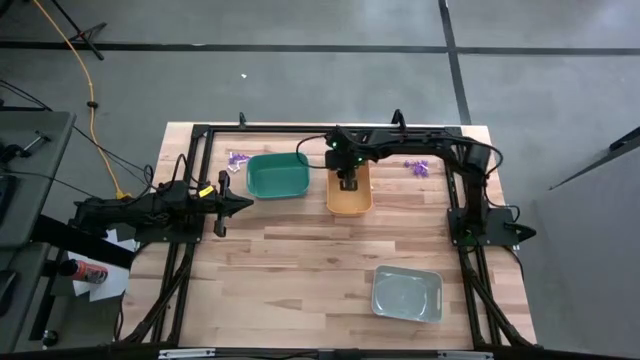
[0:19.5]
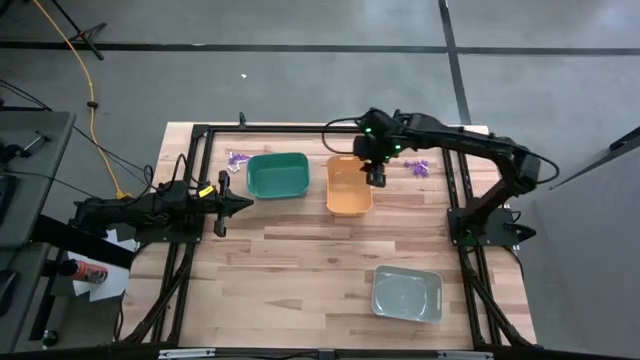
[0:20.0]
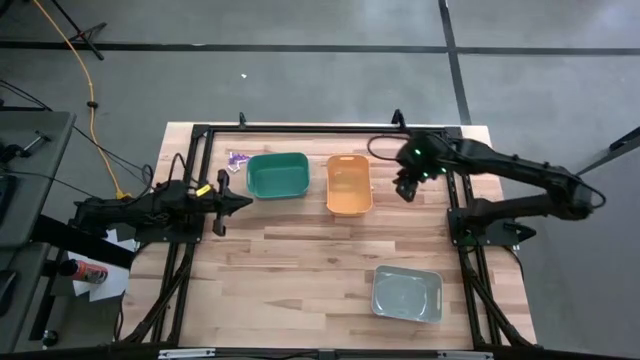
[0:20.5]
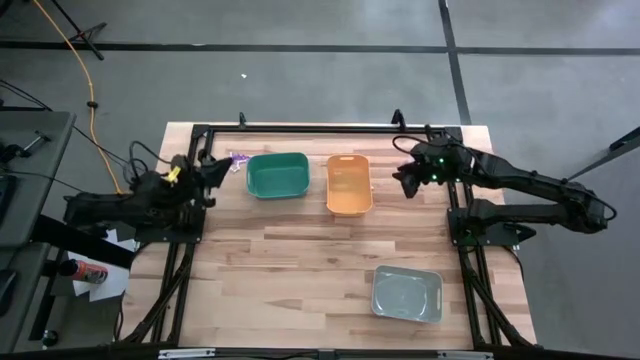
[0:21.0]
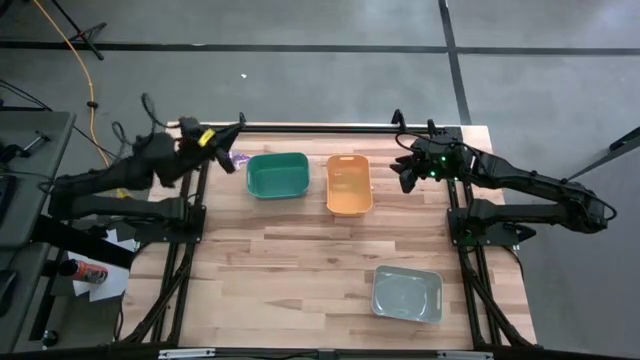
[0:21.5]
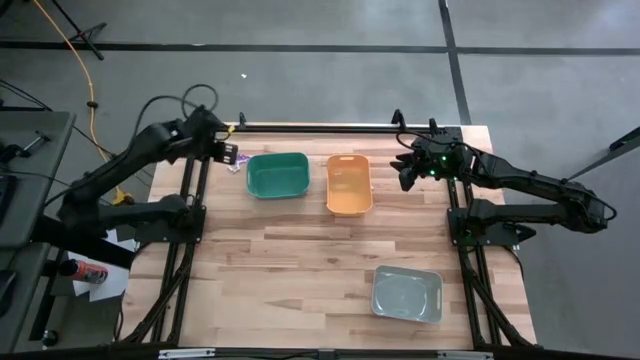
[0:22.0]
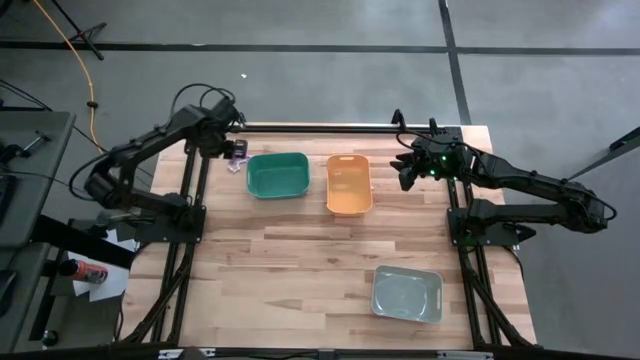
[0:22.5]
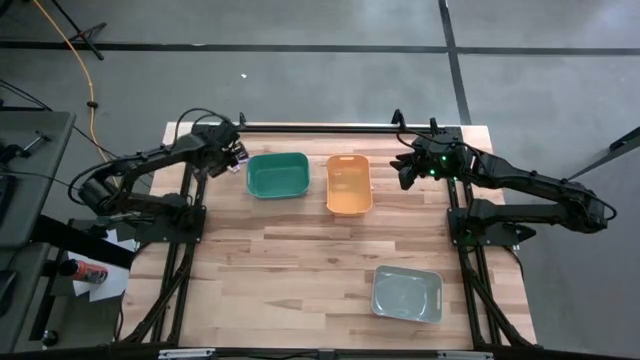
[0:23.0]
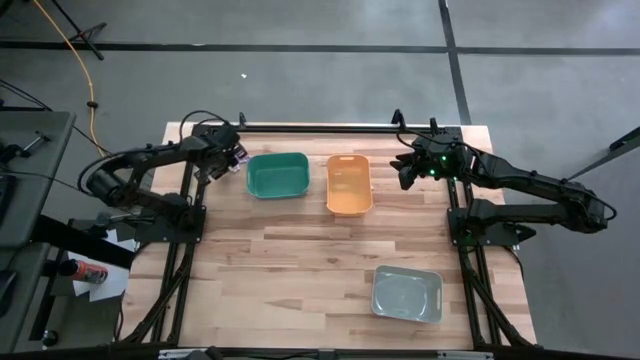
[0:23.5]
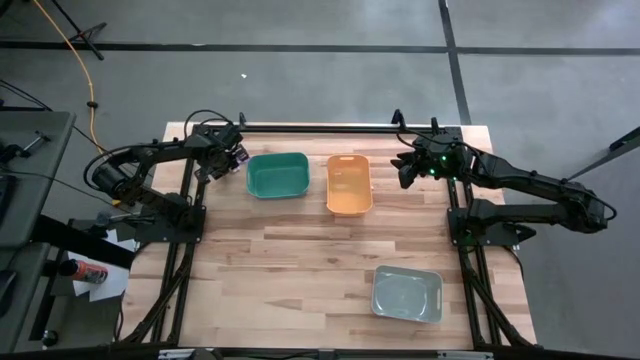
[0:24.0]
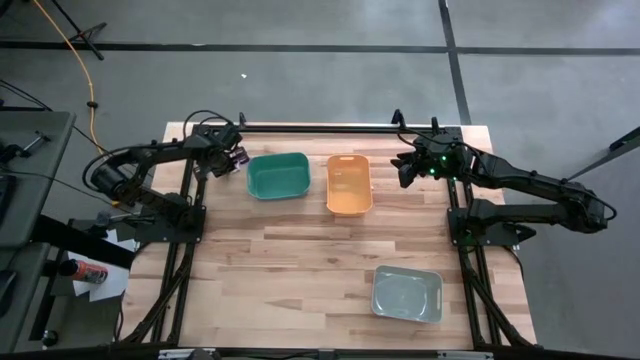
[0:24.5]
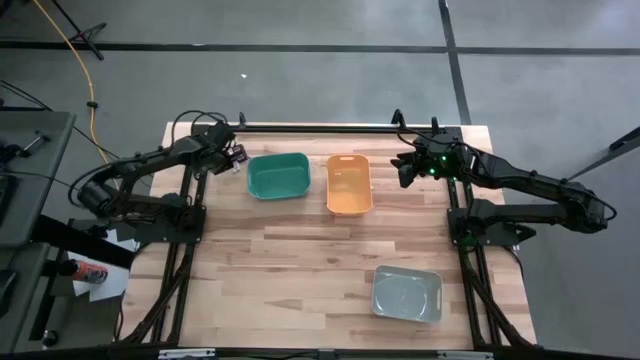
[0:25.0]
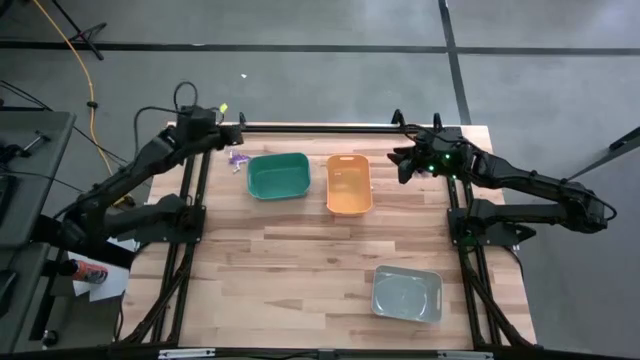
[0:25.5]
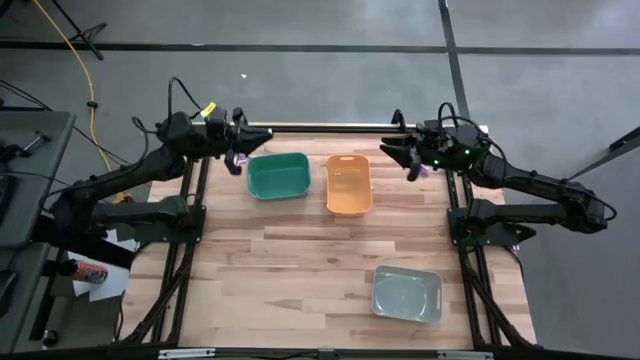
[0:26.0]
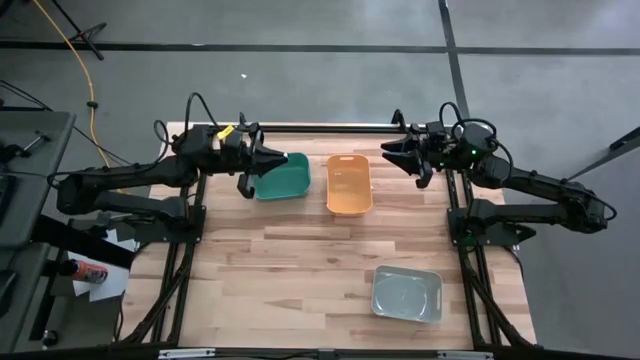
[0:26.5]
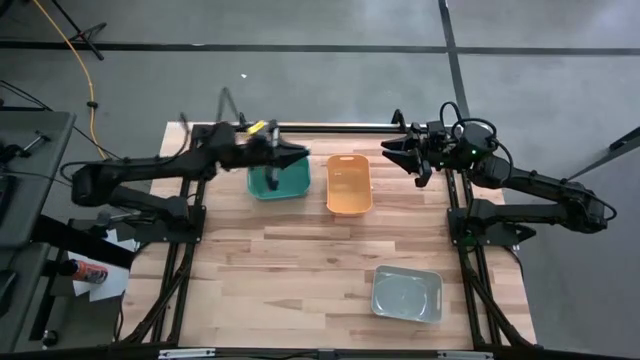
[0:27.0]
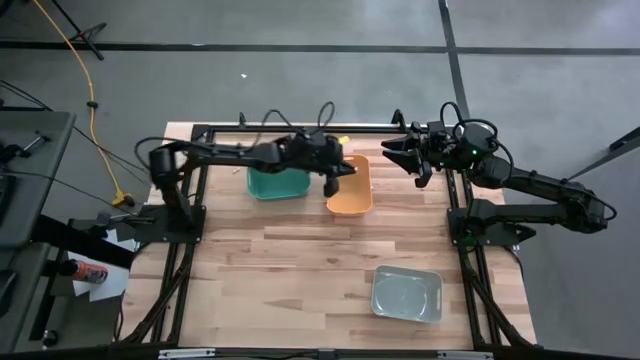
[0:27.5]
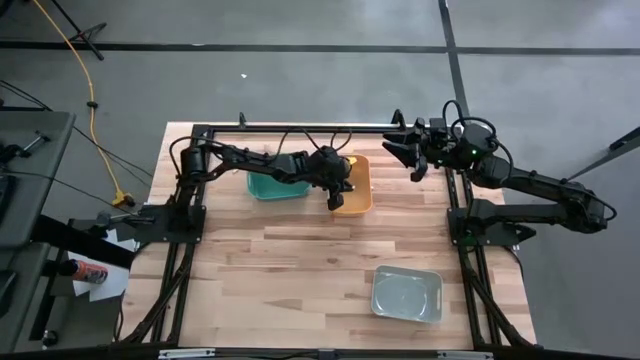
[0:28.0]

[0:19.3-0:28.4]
Task: Sort Halloween decoration
Put the white bone toy into the yellow bin

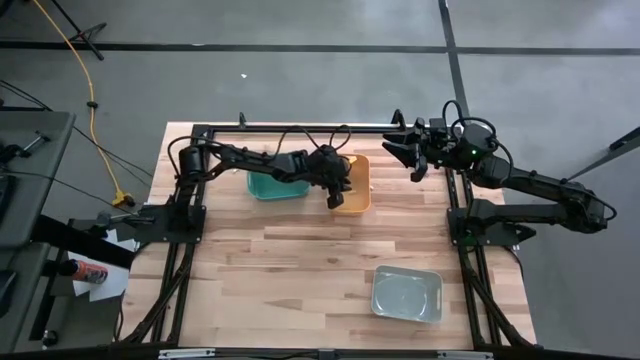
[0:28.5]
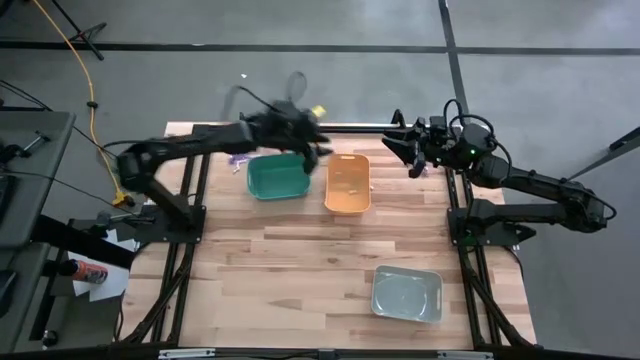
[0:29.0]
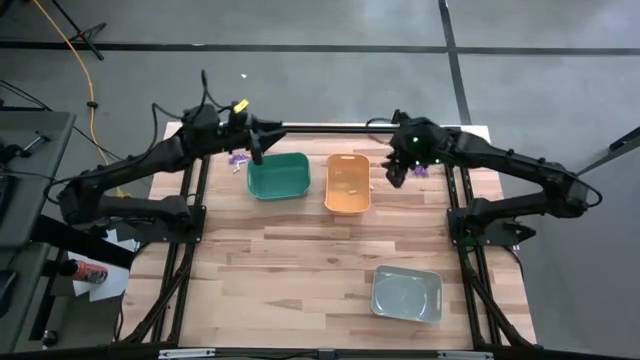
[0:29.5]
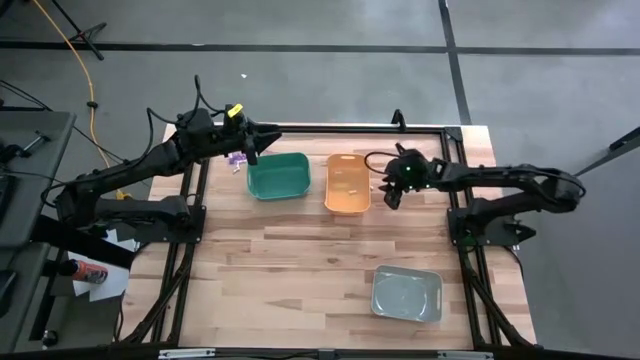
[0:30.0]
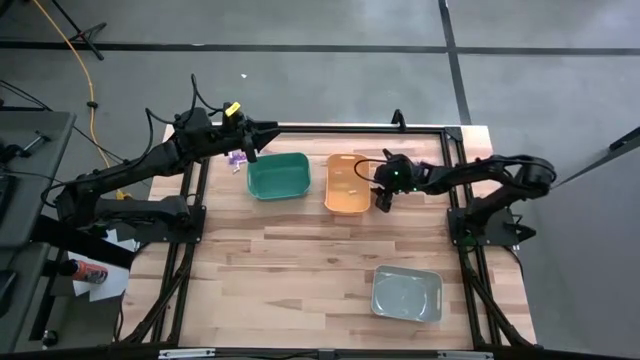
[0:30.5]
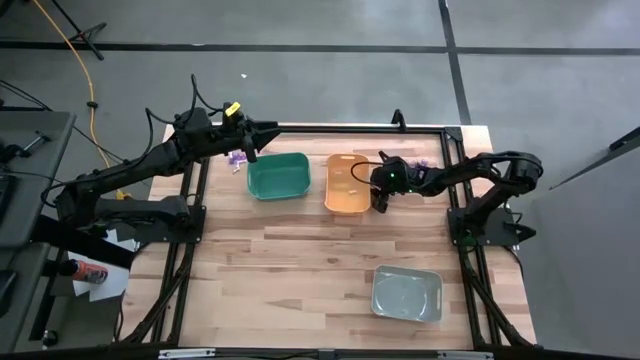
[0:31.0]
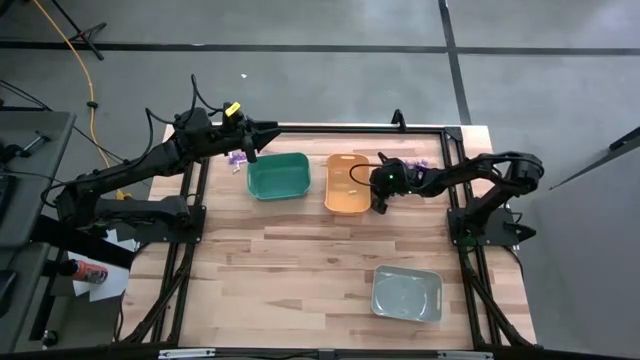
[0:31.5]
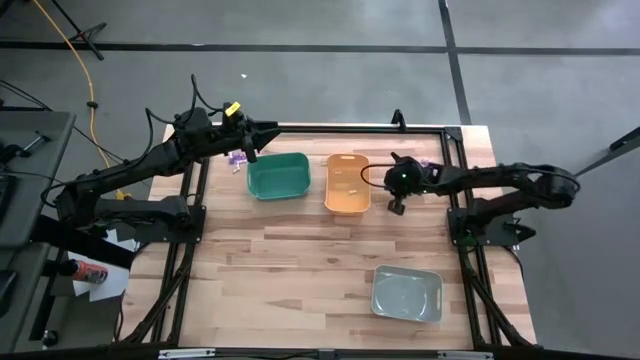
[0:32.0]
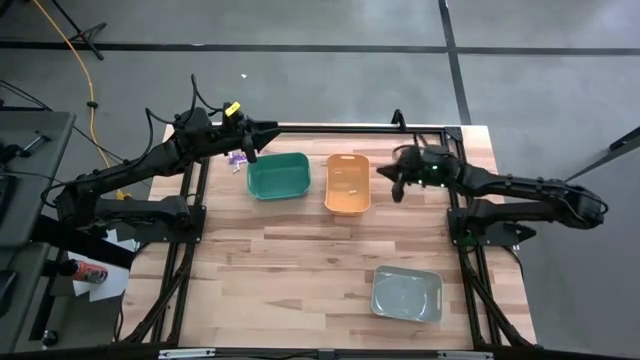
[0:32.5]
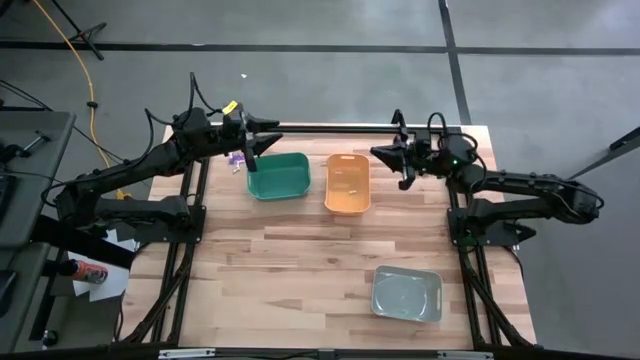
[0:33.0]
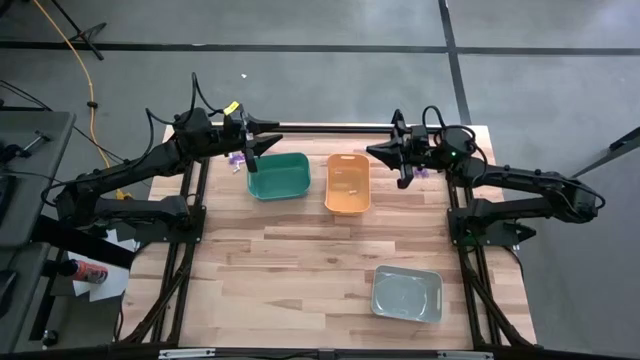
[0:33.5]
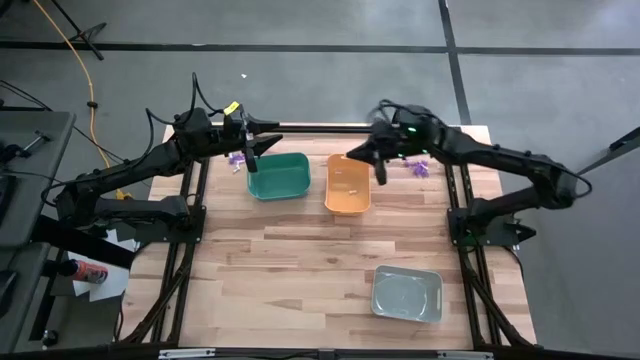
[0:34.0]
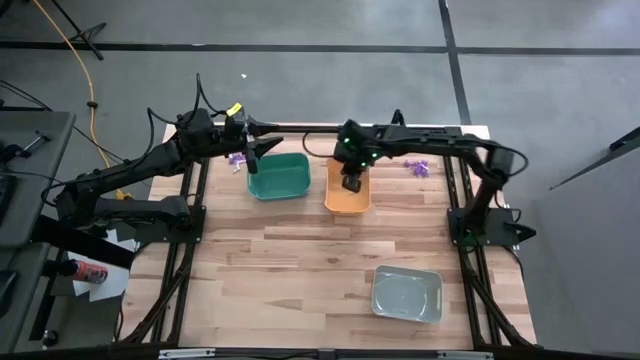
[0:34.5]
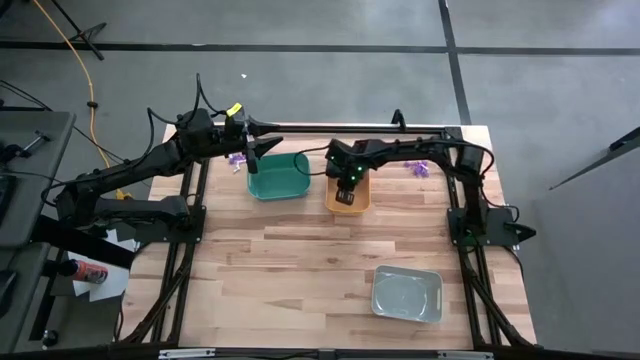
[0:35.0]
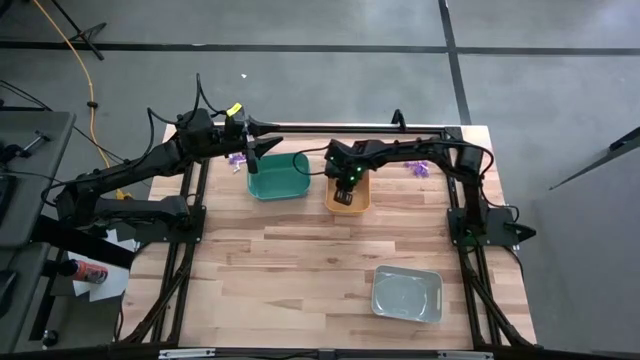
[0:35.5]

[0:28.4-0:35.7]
Put the white bone toy into the yellow bin

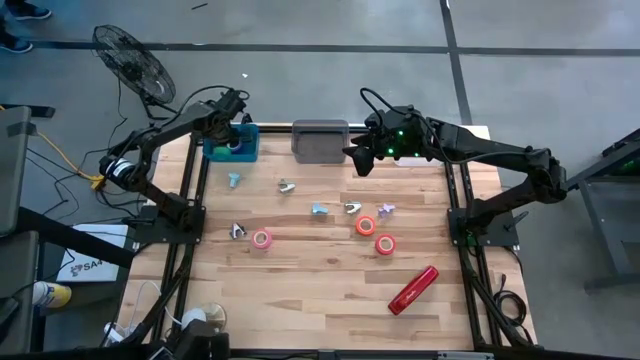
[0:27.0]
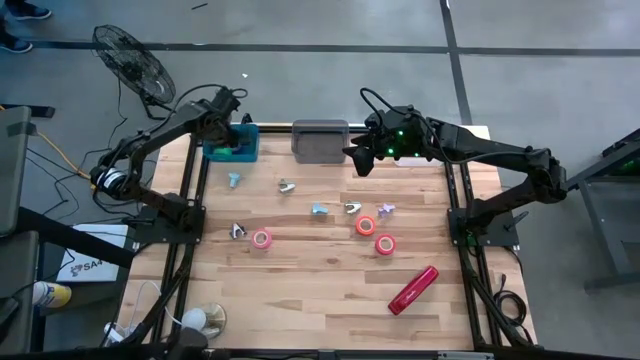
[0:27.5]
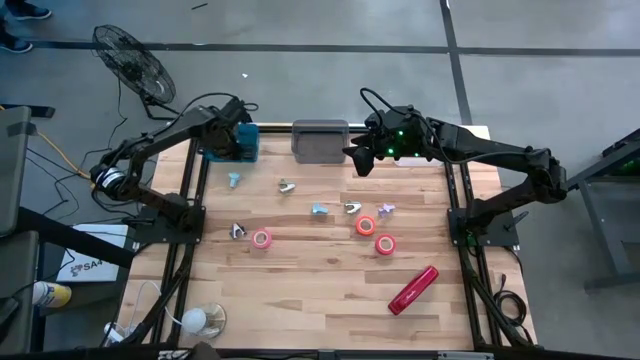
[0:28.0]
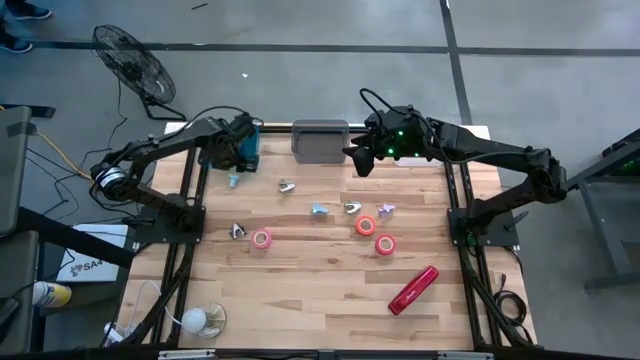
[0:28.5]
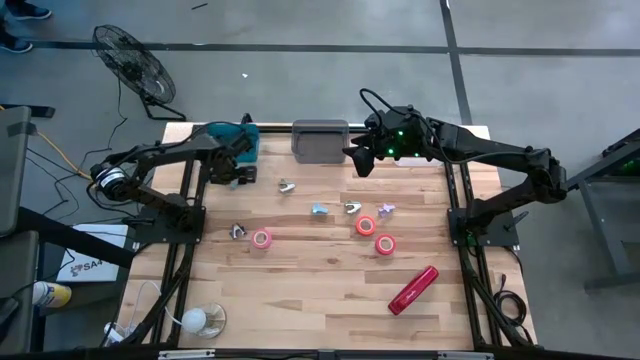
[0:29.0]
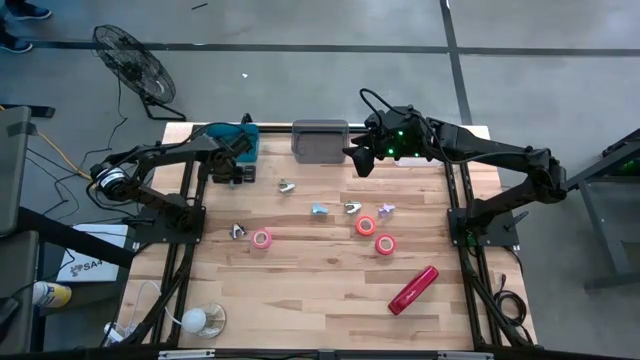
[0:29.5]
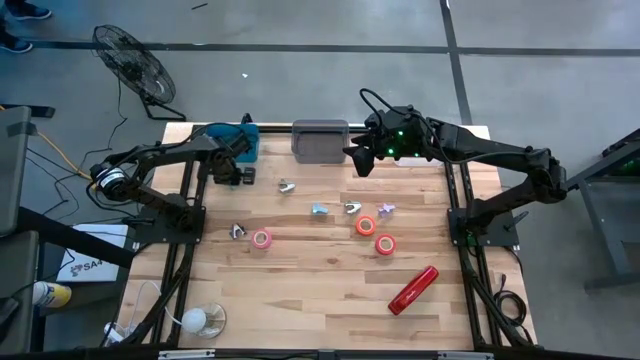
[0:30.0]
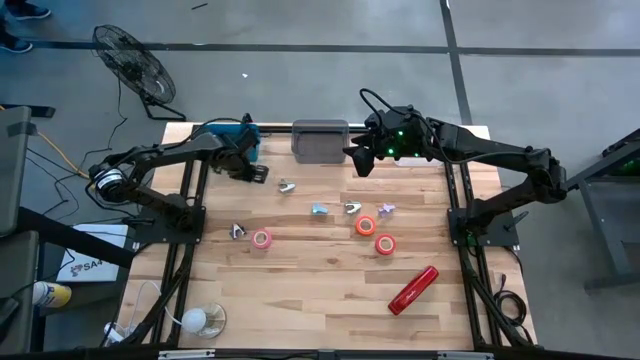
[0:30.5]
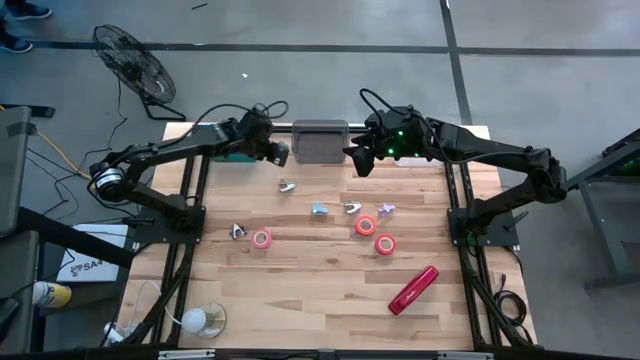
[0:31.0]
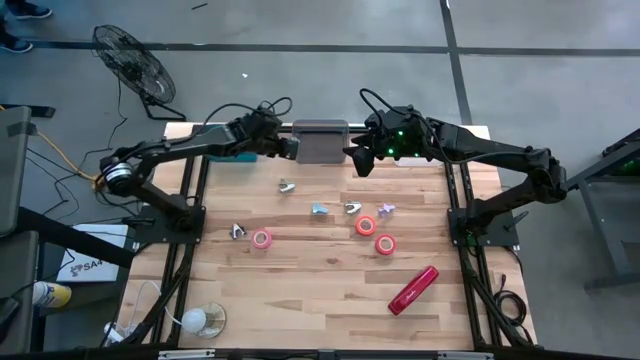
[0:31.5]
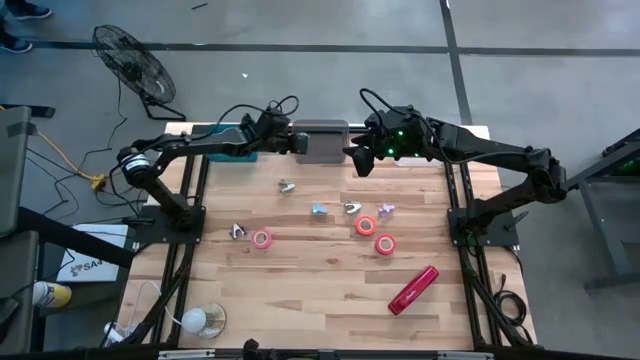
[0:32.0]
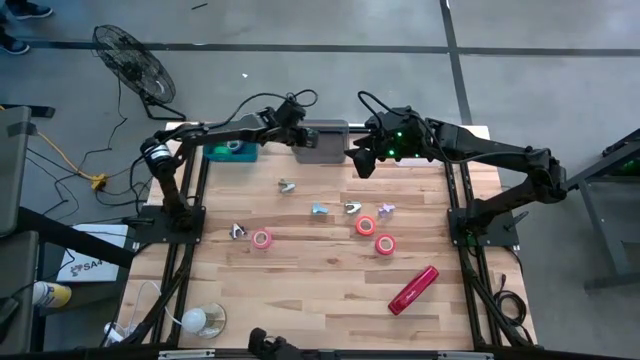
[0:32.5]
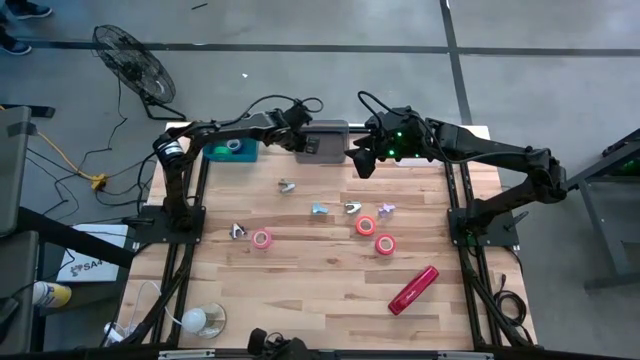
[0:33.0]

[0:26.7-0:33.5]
Task: Pick and place Stapler, Stapler remover, tape
Put the left blue staple remover into the black bin
